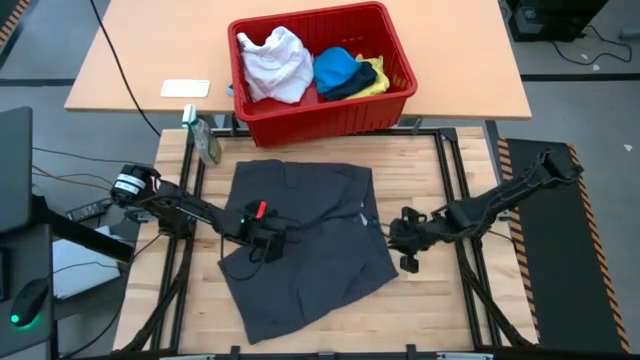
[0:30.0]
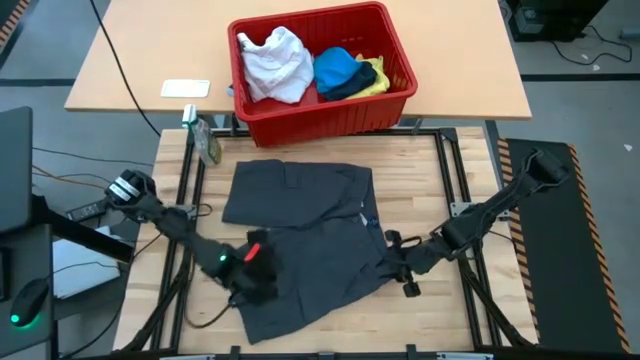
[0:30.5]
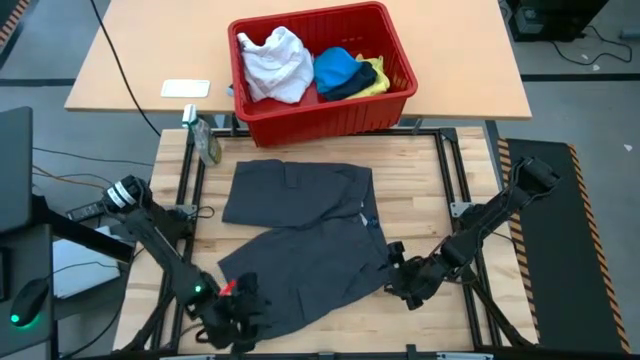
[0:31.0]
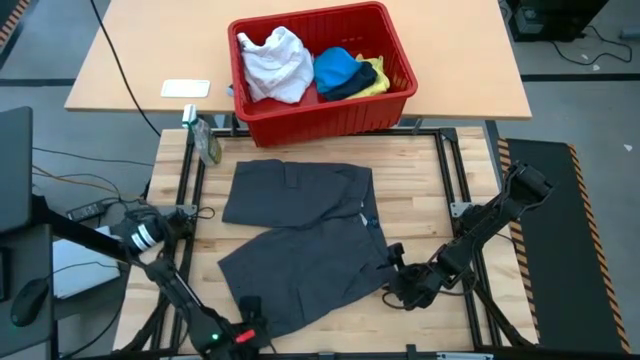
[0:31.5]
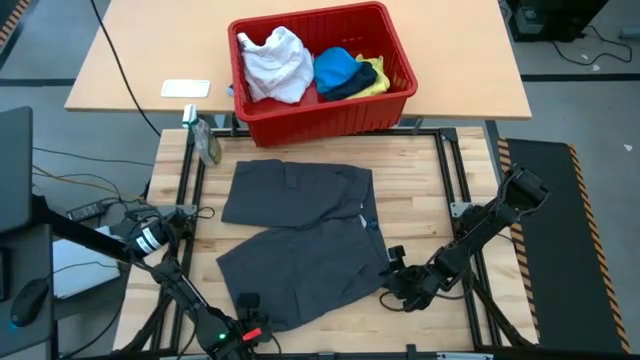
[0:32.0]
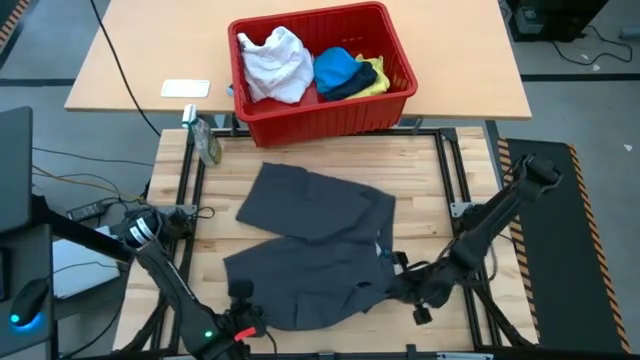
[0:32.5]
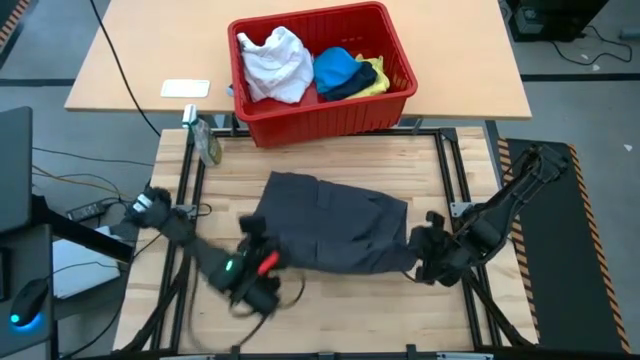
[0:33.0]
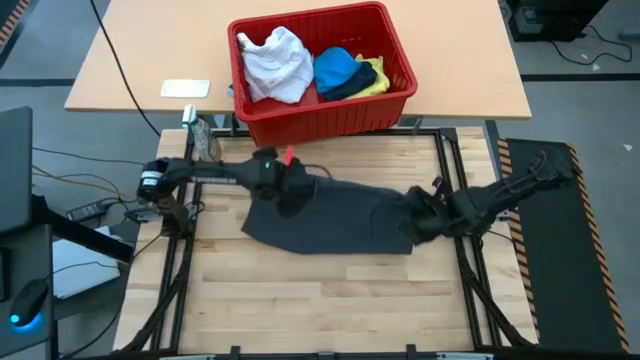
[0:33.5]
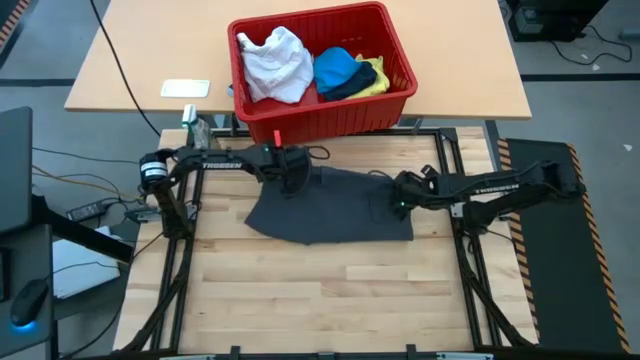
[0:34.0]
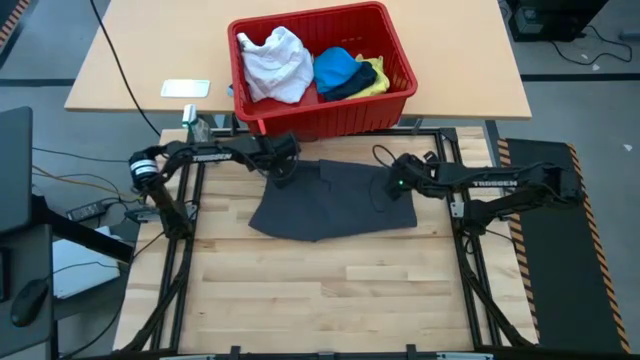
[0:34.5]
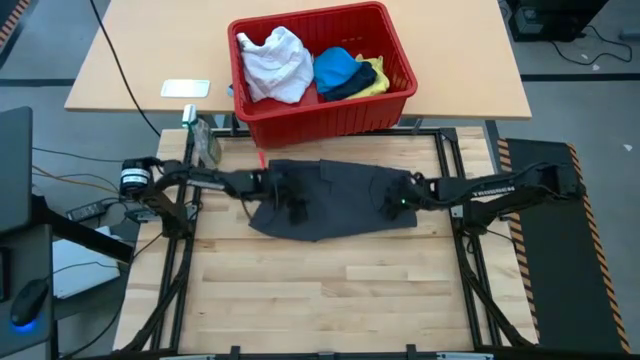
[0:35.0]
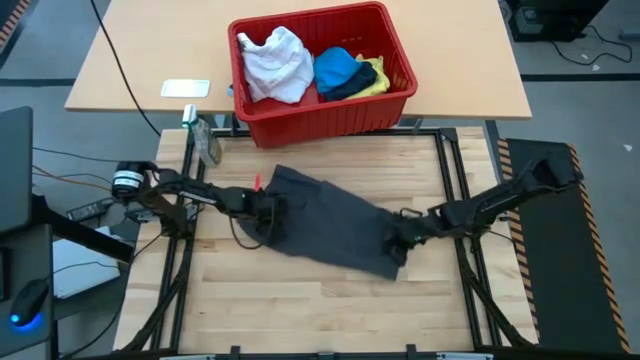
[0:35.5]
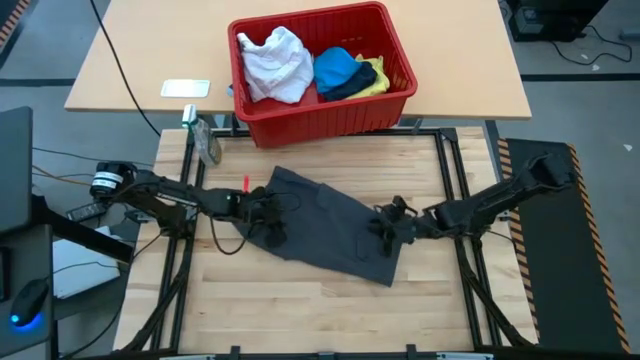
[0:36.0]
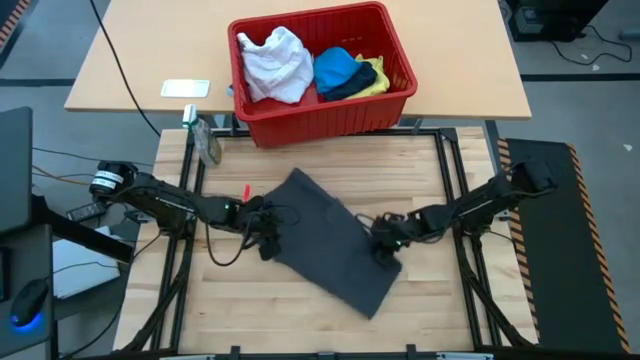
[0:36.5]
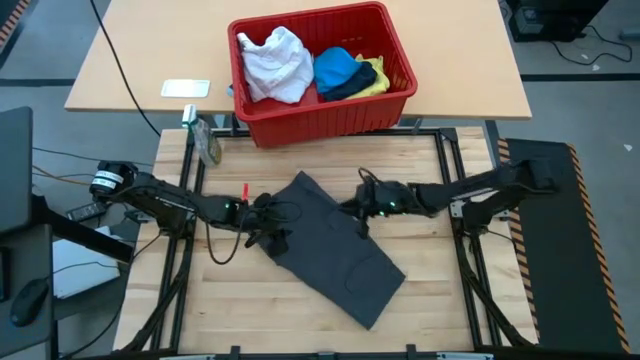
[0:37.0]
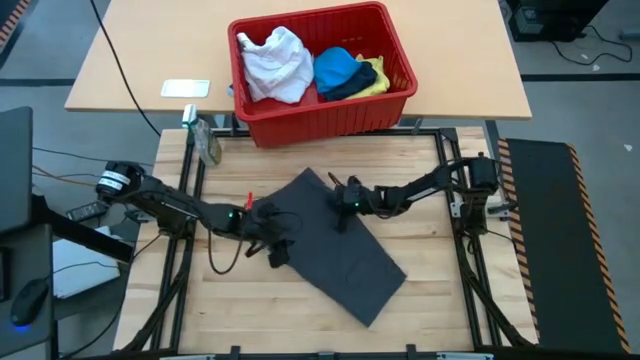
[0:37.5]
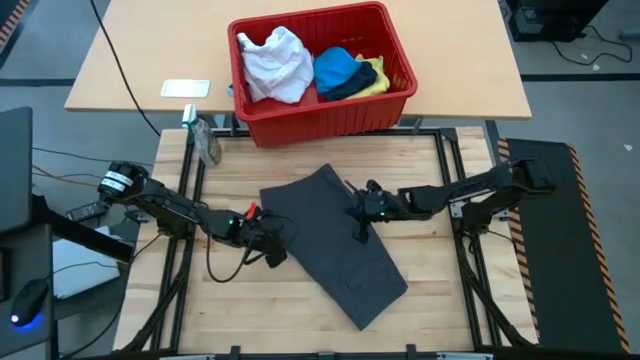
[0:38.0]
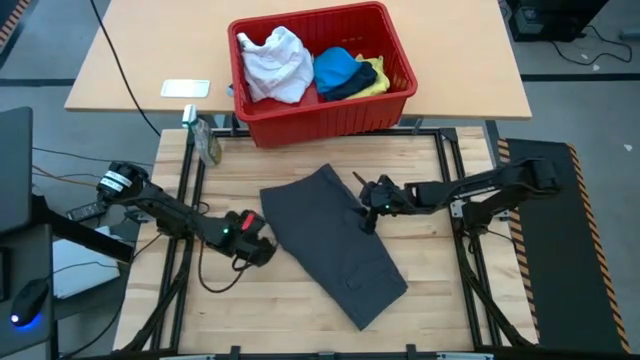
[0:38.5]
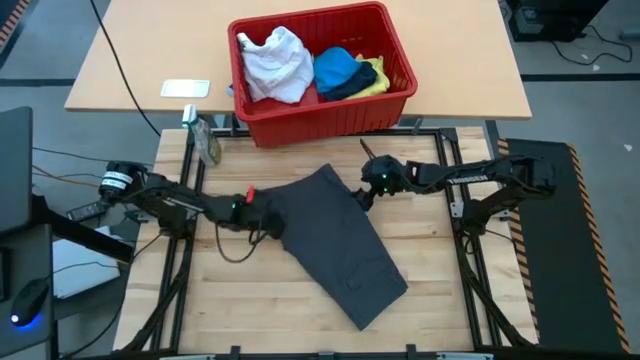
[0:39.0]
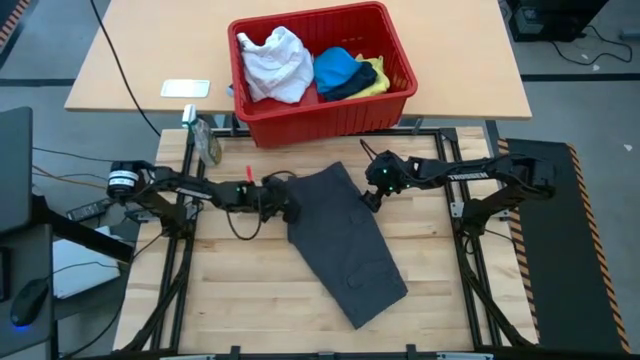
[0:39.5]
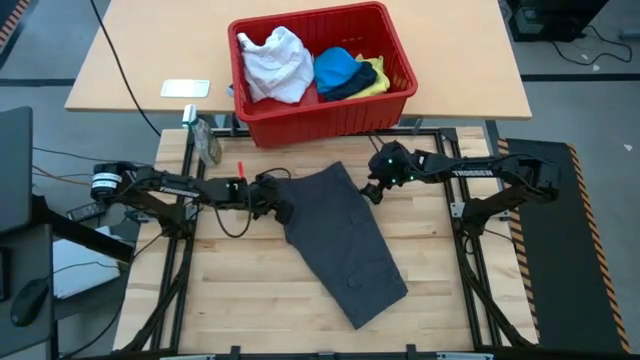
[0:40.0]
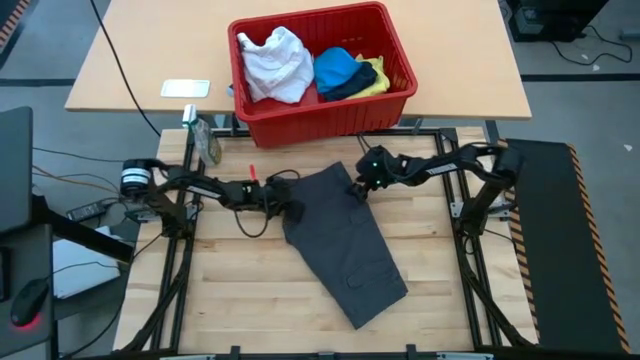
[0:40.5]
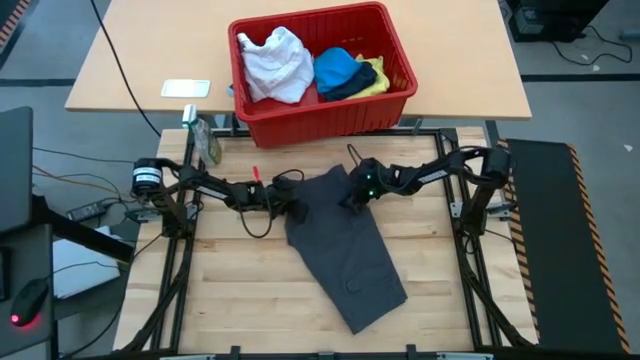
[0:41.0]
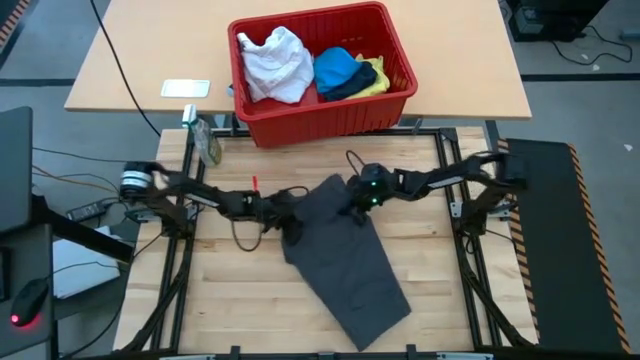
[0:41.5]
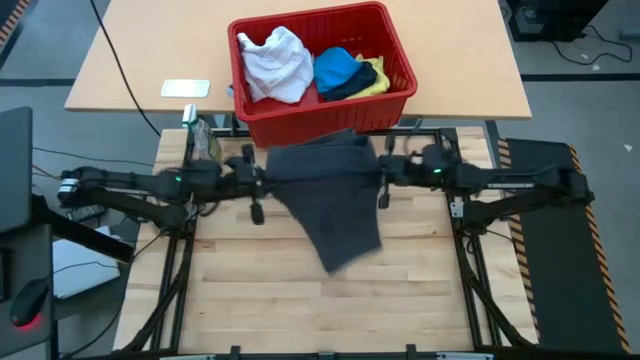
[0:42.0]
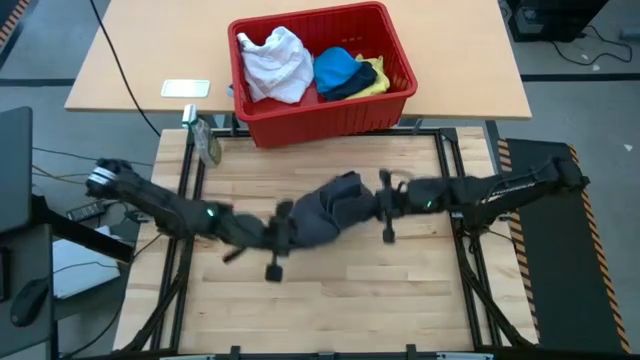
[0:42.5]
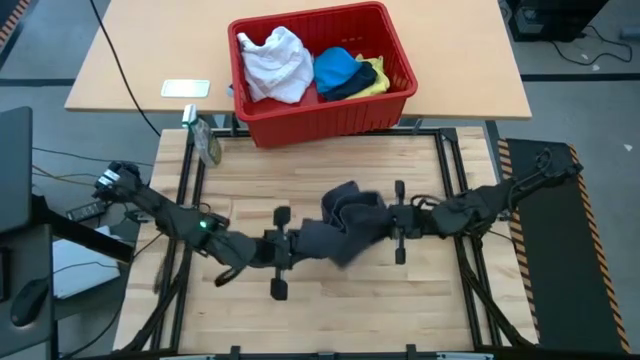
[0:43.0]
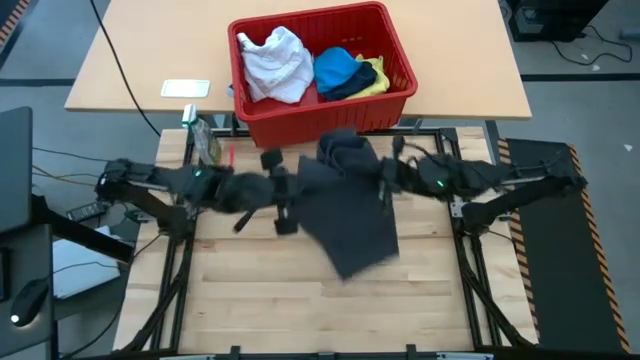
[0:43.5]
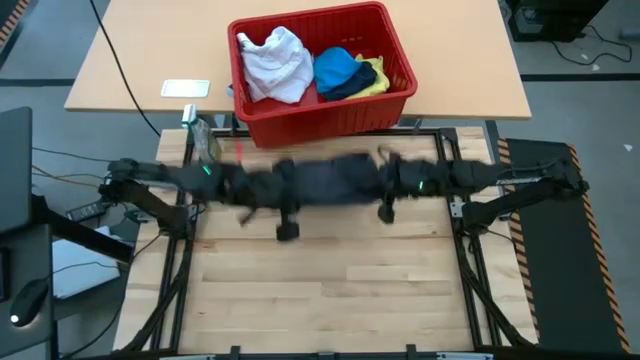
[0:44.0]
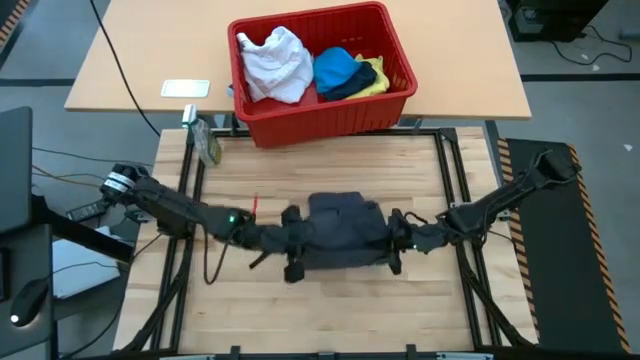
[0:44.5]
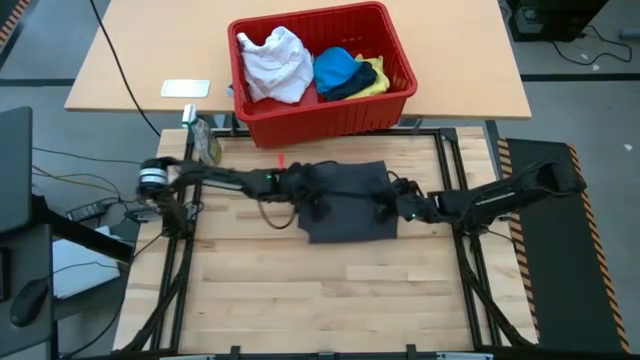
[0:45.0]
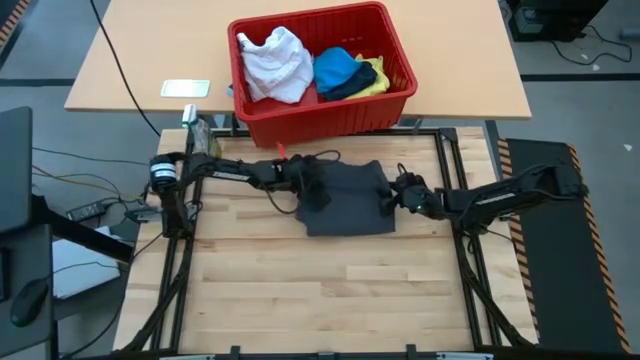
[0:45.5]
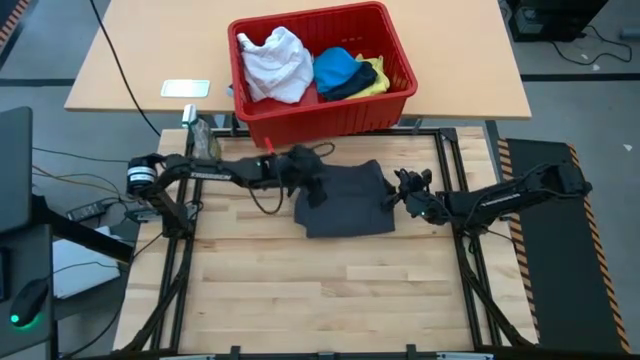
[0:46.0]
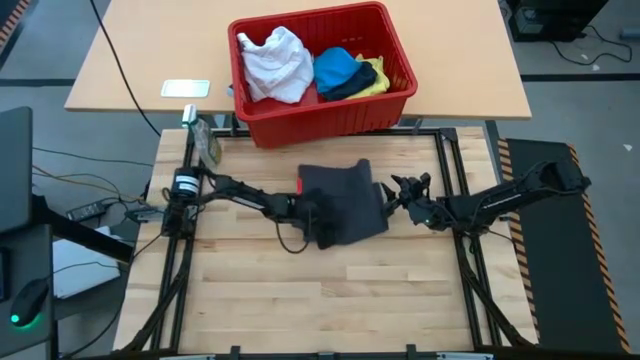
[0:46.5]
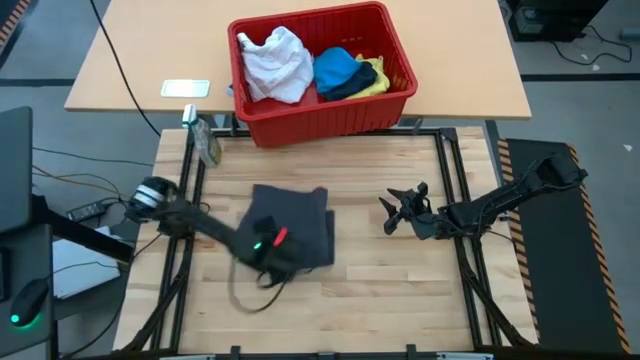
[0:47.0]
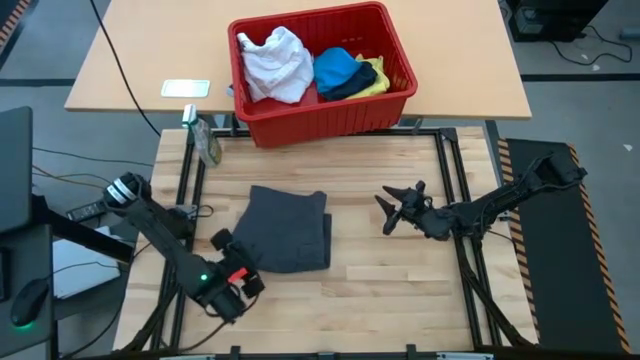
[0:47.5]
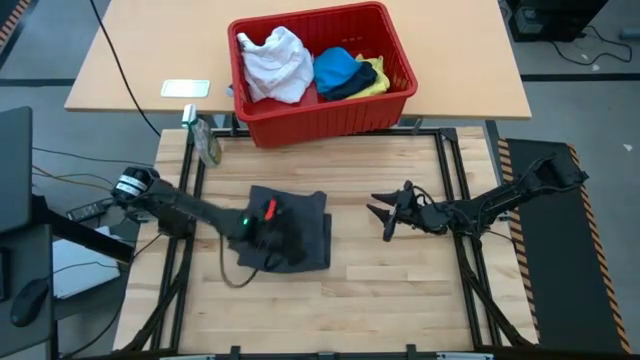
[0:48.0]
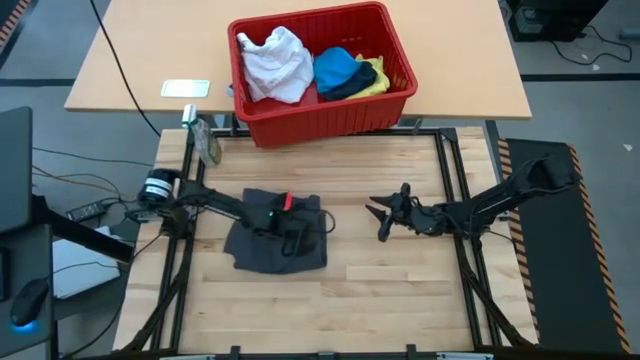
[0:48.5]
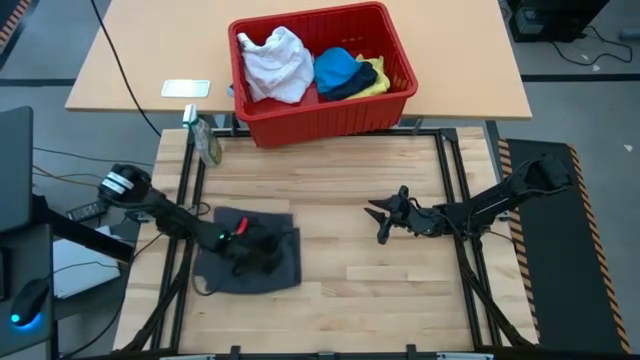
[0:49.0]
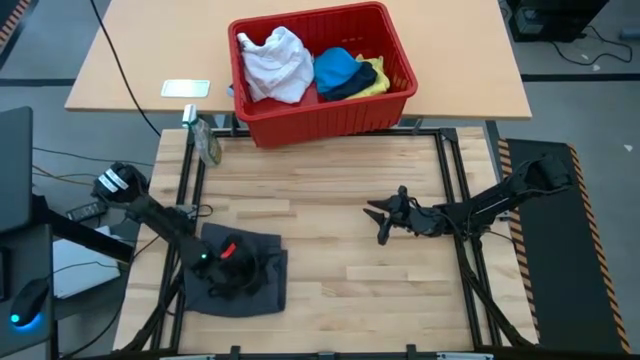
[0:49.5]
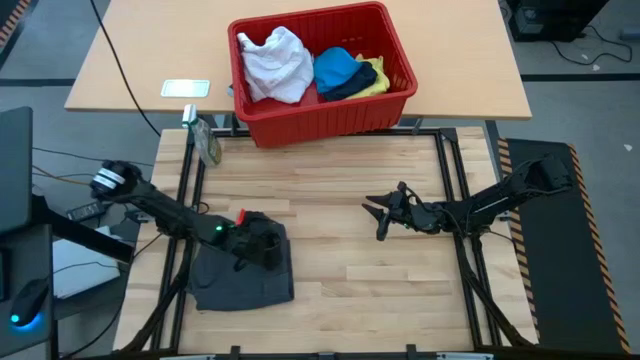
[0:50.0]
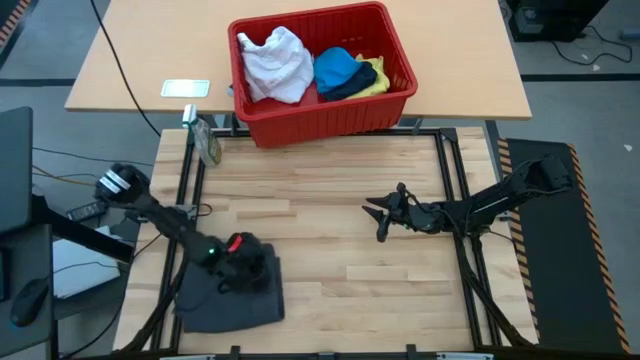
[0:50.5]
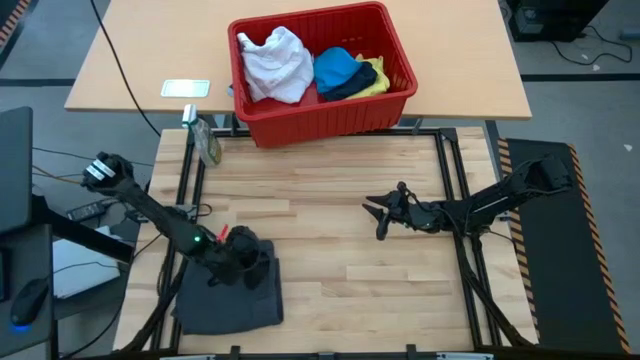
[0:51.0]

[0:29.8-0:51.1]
Task: Fold laundry
Fold the black shorts

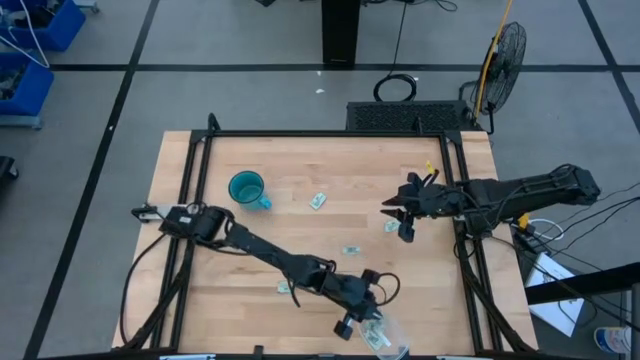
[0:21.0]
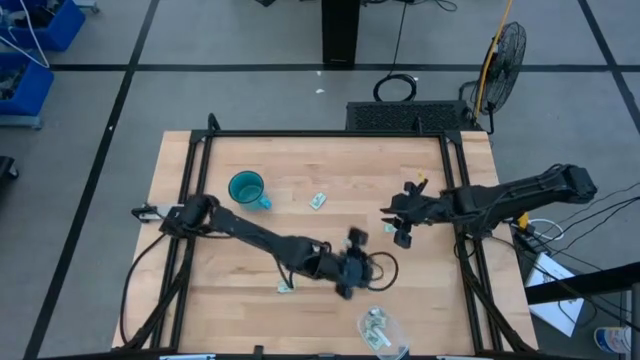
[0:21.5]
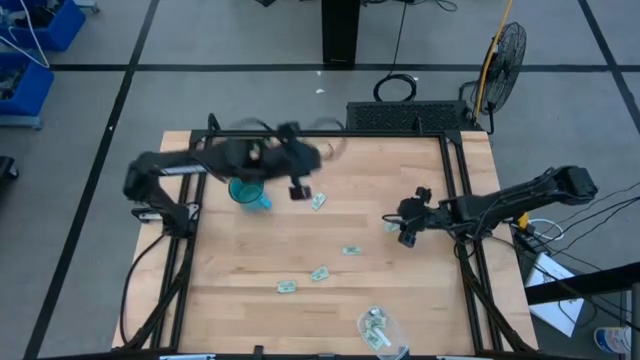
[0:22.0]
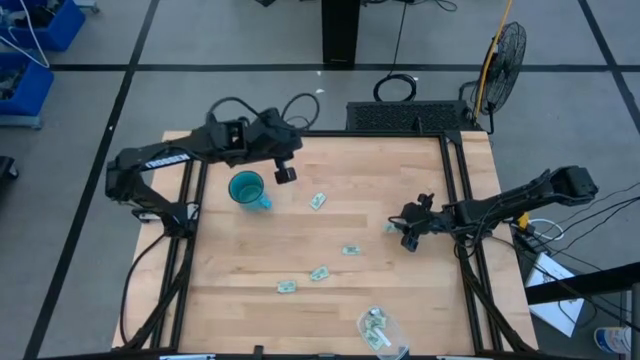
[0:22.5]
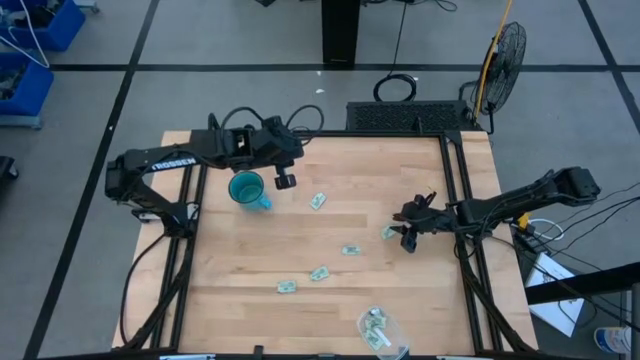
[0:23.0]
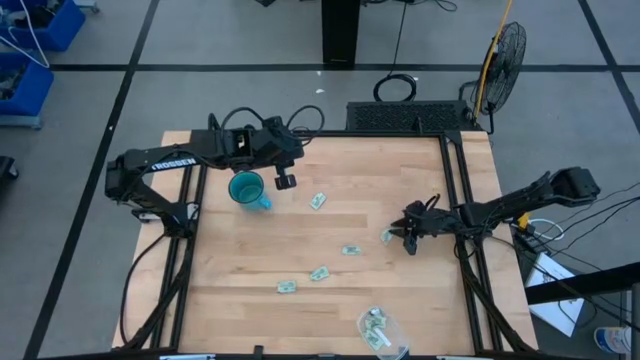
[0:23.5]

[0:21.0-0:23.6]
Task: Pick and place Stevia / Truvia into bins
Put the green stevia packet into the transparent container
